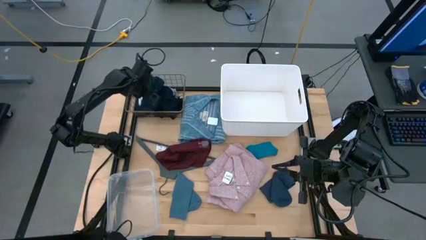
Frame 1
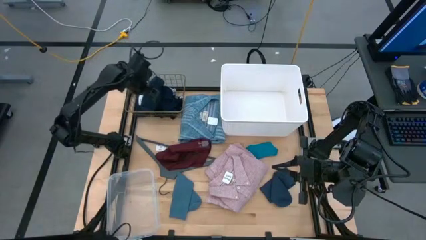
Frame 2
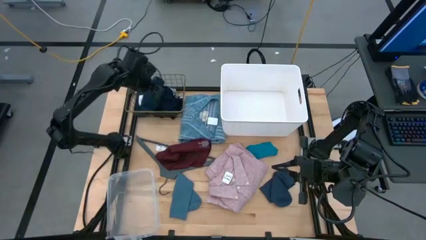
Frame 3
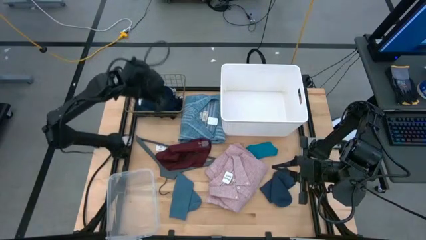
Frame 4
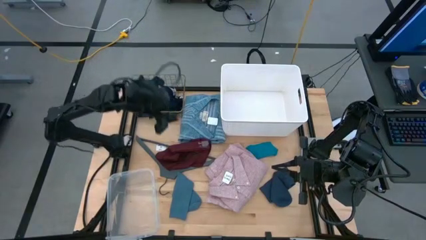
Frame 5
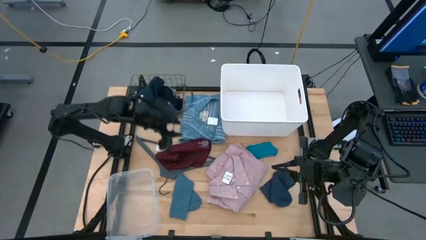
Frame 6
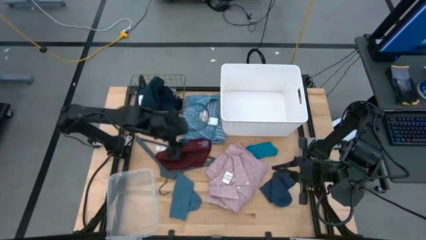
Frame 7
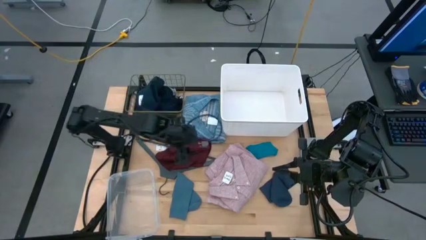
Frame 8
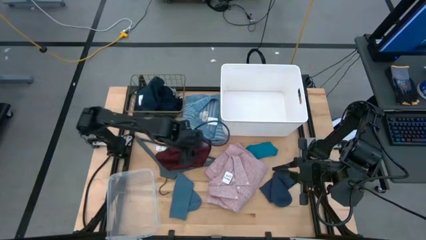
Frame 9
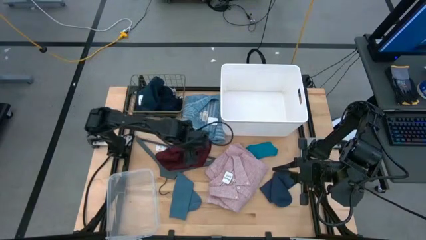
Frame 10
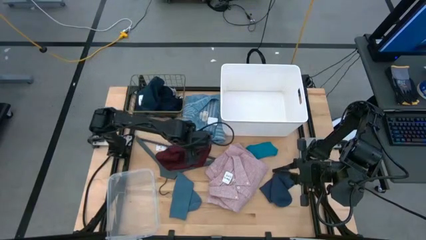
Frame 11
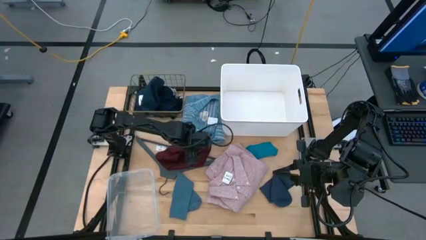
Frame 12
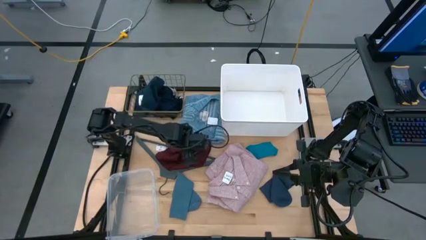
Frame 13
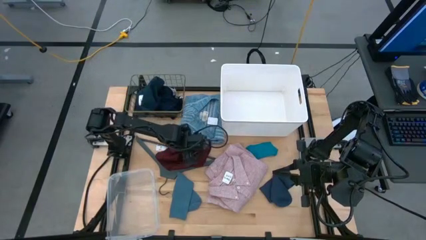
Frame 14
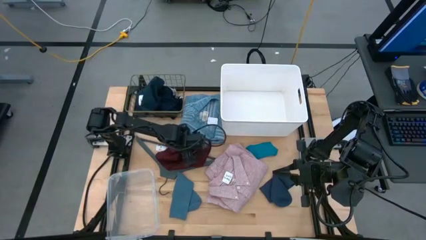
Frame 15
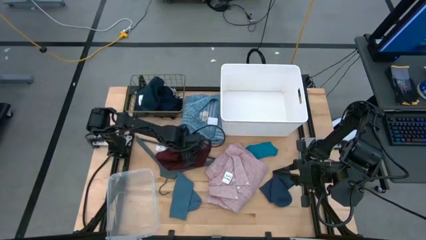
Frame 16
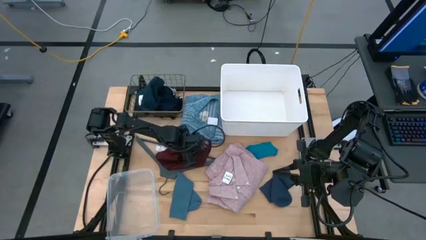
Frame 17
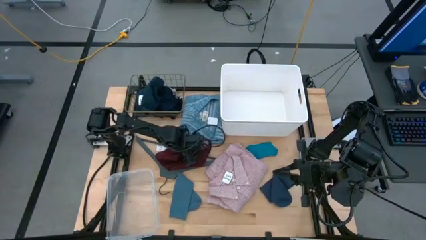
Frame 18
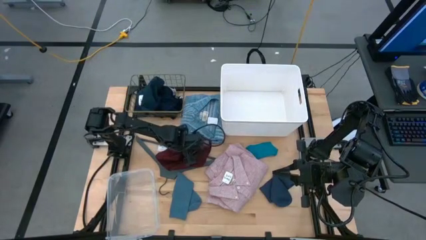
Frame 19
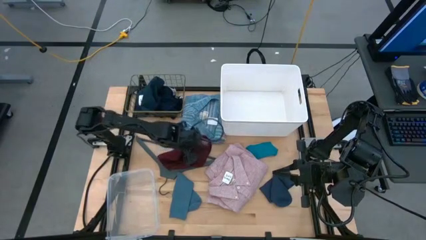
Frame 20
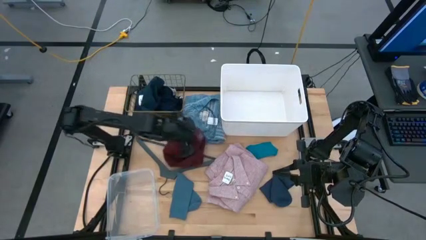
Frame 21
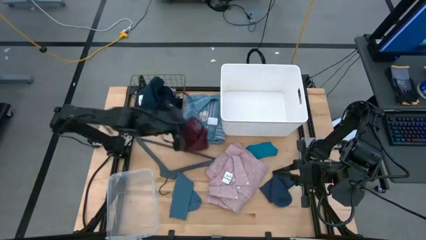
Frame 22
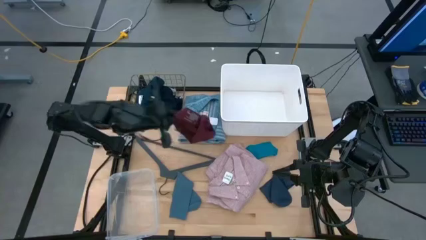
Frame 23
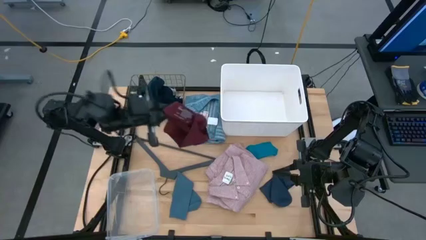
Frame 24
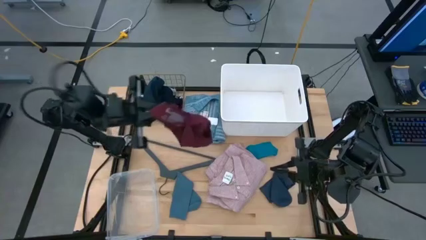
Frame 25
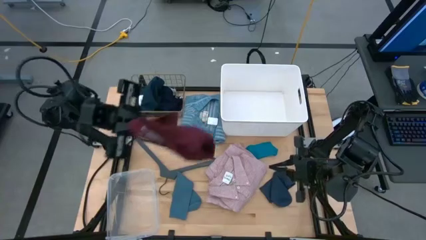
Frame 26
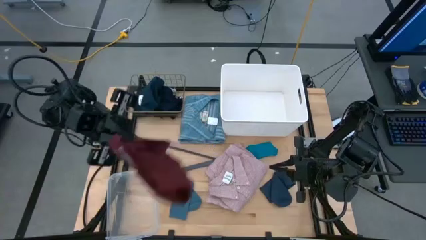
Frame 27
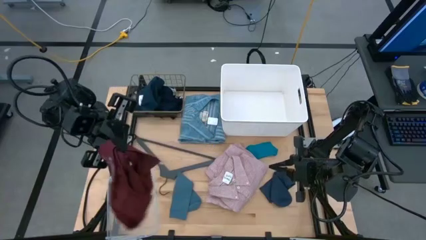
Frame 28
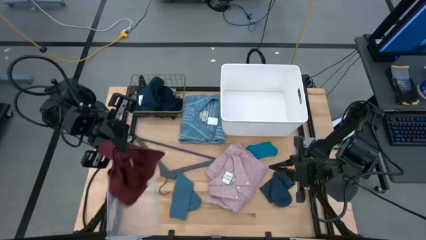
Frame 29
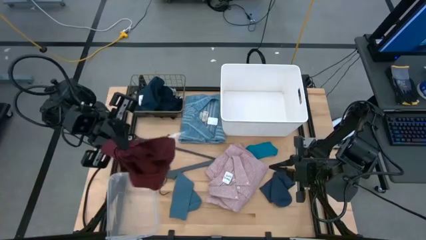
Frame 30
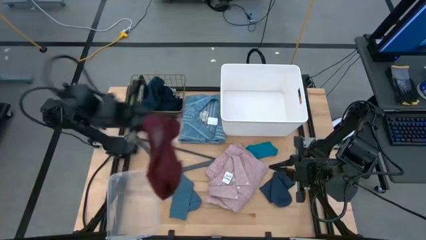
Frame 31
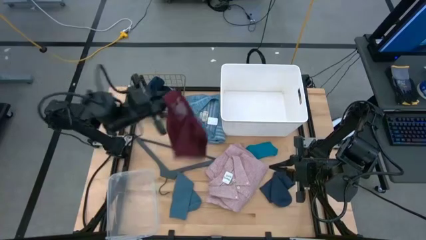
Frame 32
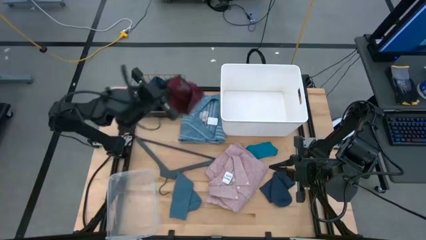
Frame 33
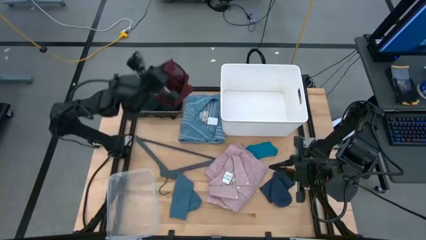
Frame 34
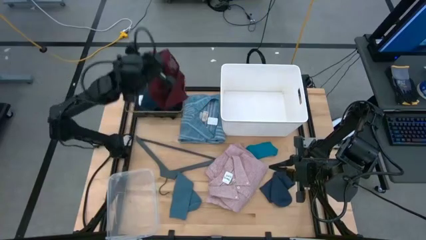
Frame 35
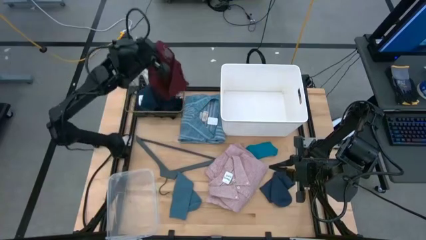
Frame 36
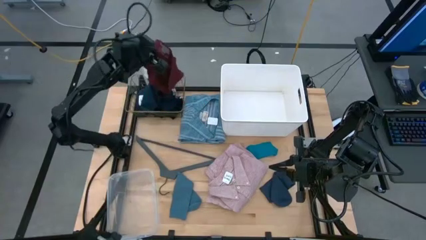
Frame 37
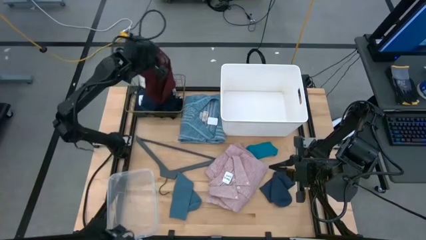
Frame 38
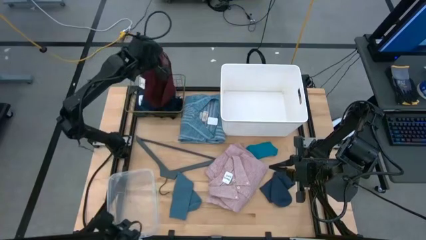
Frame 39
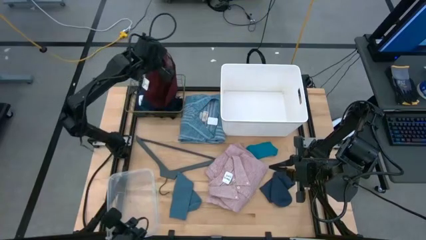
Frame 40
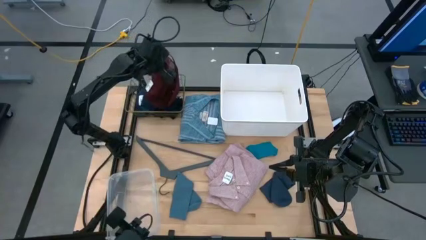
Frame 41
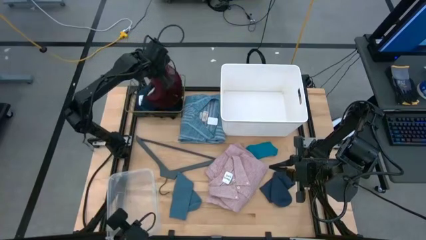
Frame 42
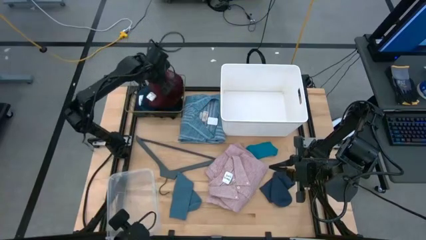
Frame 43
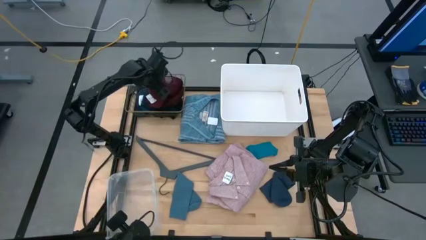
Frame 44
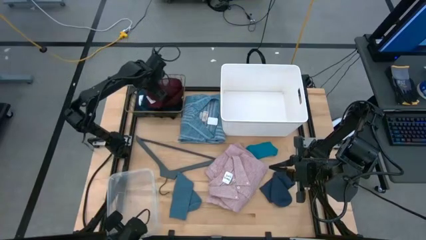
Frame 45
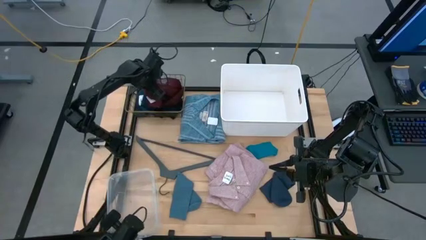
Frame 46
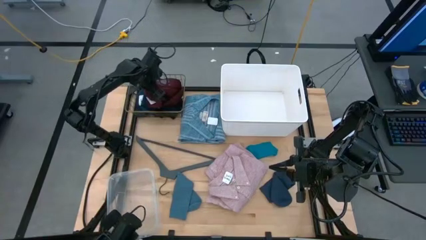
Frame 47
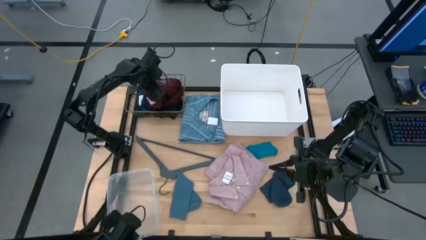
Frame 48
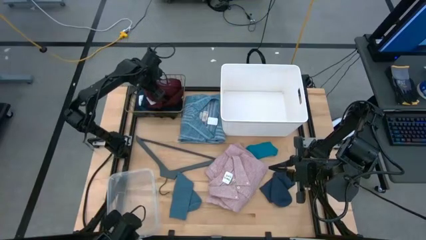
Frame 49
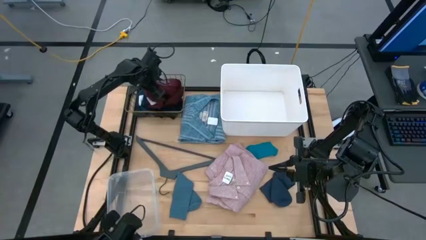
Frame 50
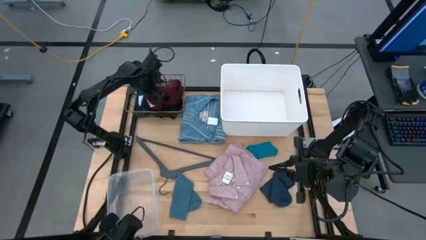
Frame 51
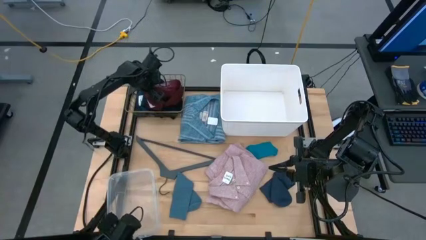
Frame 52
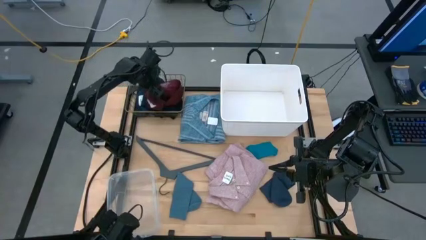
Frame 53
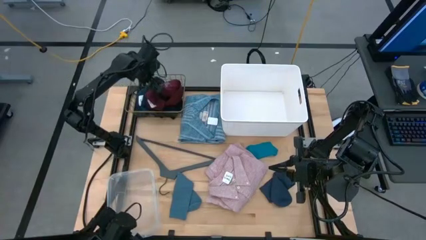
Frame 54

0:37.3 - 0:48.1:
Task: Pick & Place Cloths
Put the red underwear into the gold wire basket
